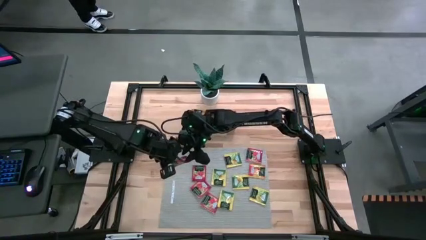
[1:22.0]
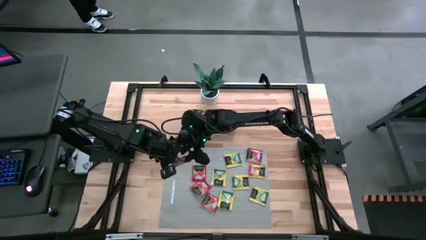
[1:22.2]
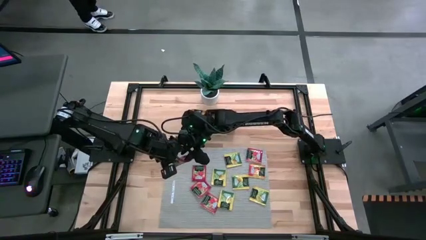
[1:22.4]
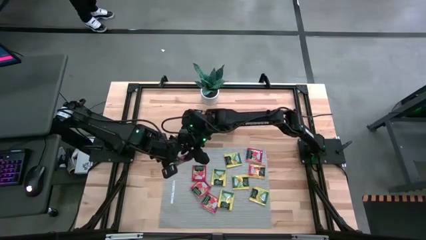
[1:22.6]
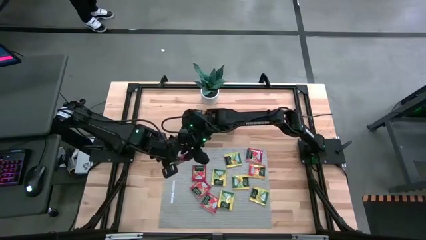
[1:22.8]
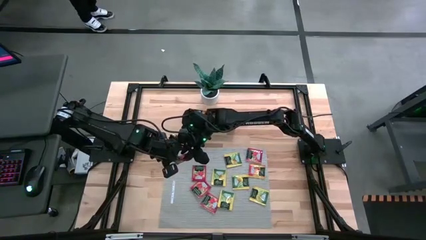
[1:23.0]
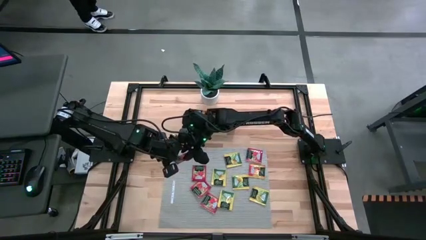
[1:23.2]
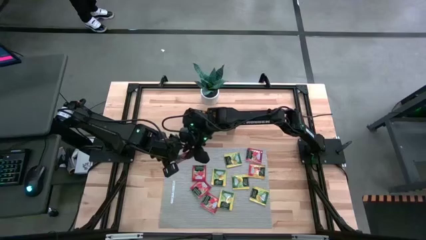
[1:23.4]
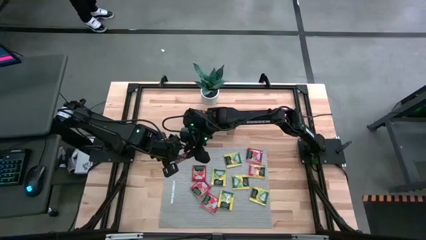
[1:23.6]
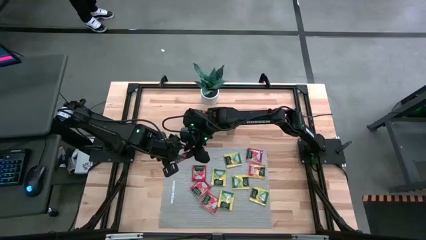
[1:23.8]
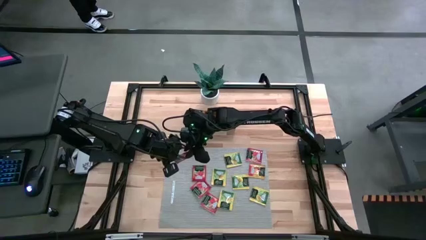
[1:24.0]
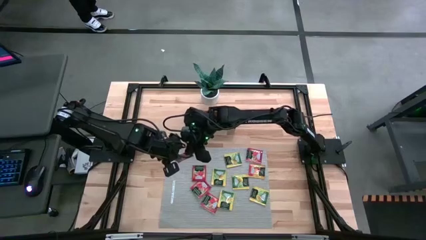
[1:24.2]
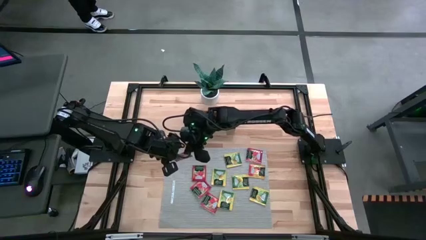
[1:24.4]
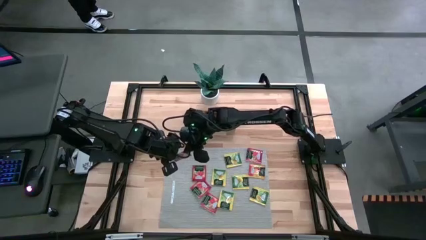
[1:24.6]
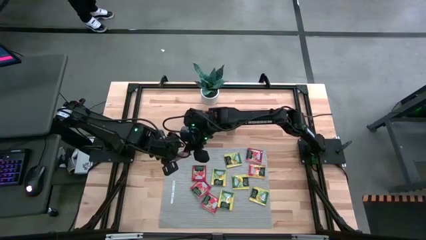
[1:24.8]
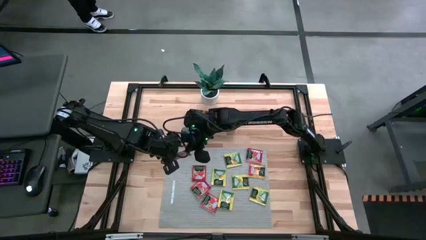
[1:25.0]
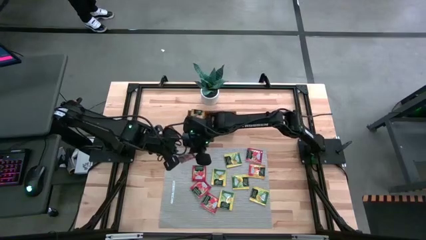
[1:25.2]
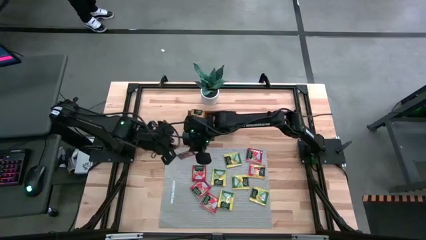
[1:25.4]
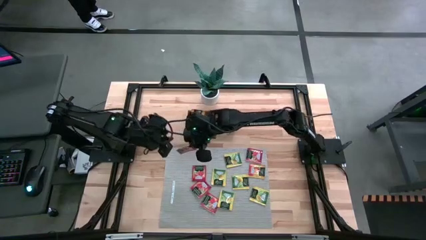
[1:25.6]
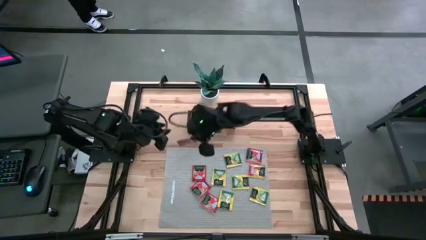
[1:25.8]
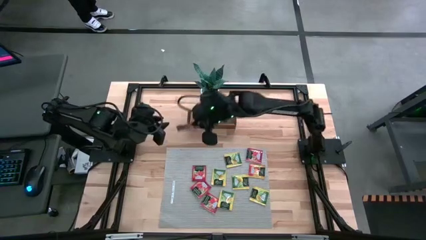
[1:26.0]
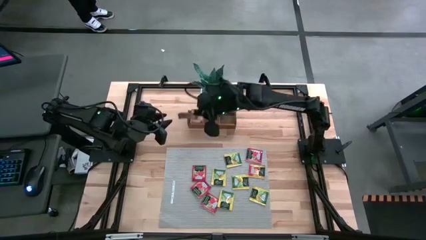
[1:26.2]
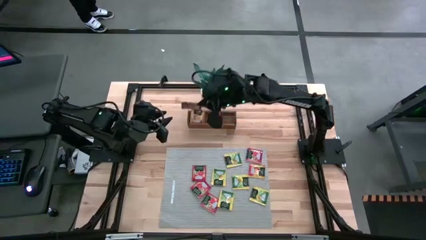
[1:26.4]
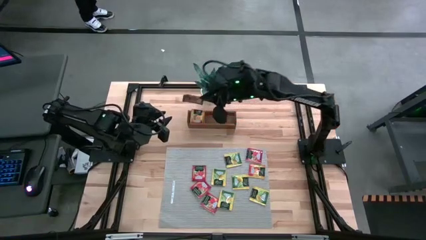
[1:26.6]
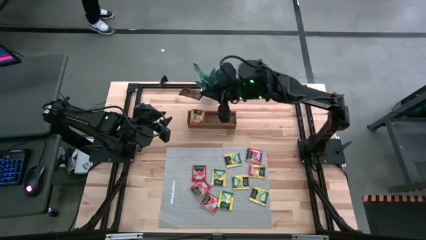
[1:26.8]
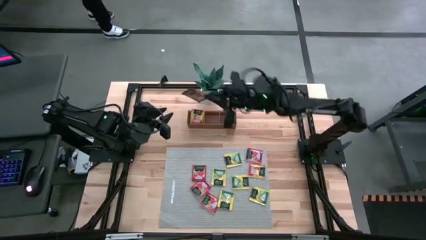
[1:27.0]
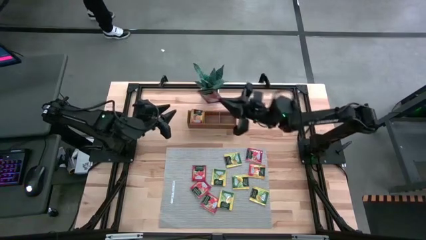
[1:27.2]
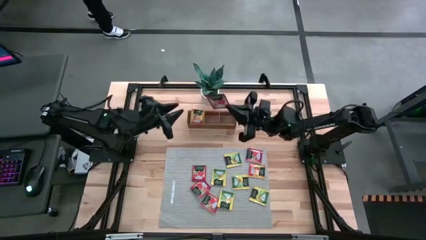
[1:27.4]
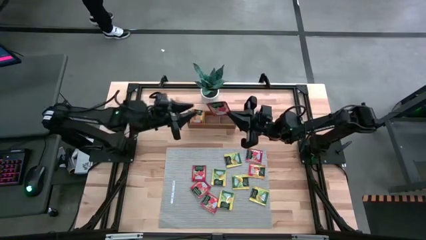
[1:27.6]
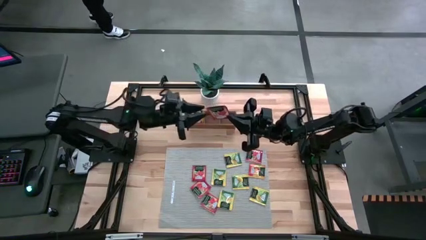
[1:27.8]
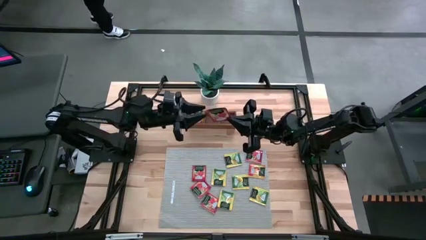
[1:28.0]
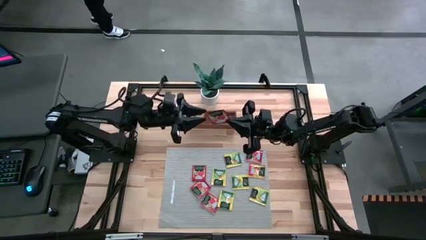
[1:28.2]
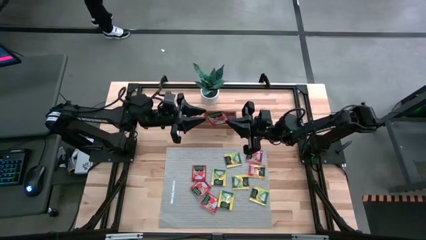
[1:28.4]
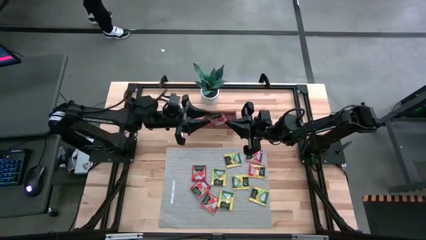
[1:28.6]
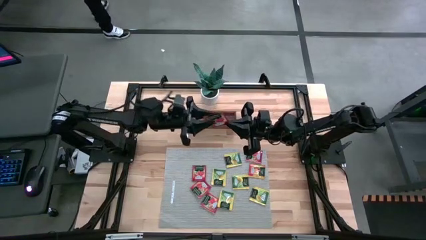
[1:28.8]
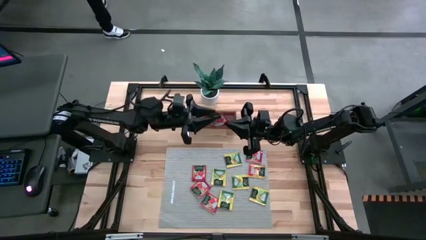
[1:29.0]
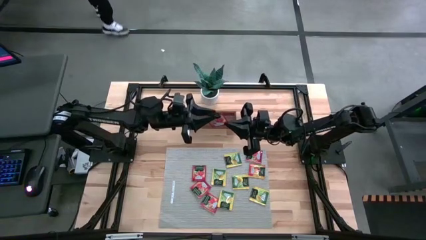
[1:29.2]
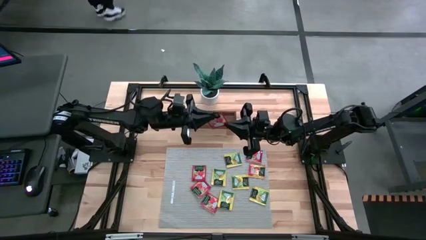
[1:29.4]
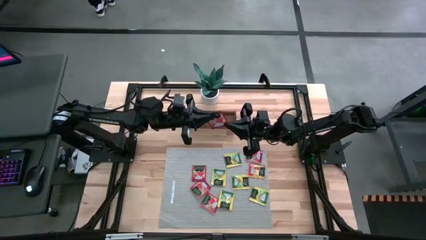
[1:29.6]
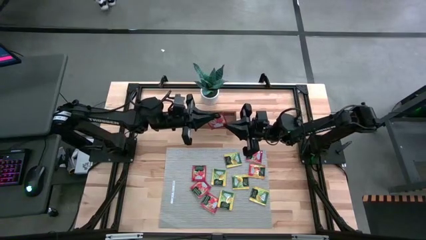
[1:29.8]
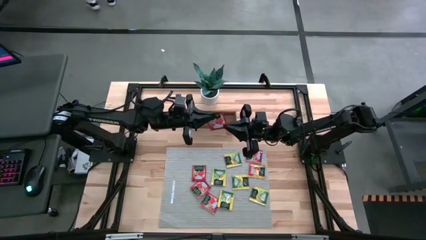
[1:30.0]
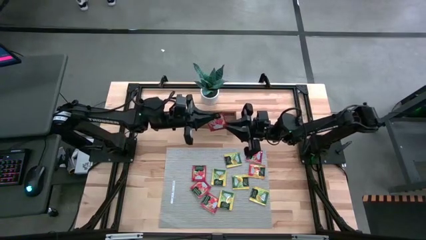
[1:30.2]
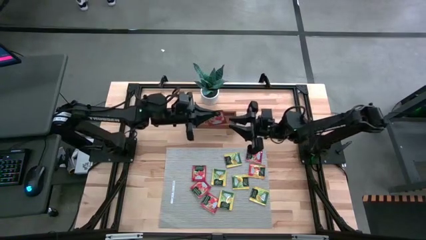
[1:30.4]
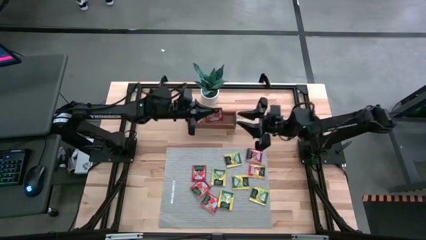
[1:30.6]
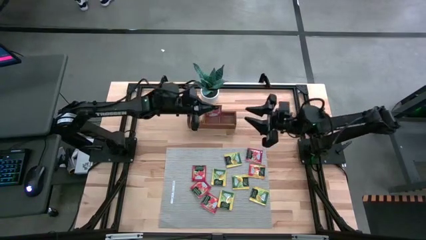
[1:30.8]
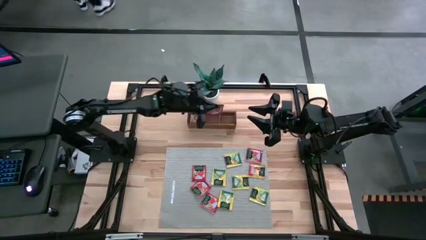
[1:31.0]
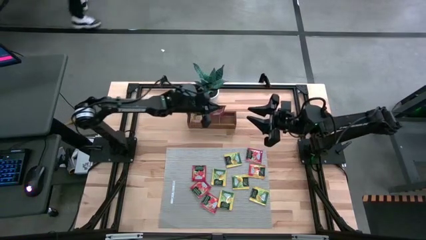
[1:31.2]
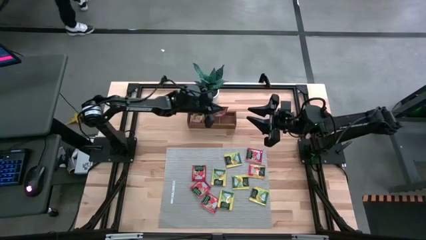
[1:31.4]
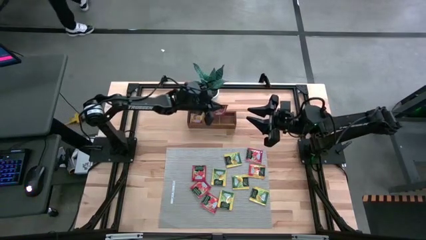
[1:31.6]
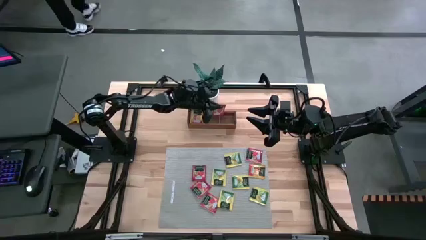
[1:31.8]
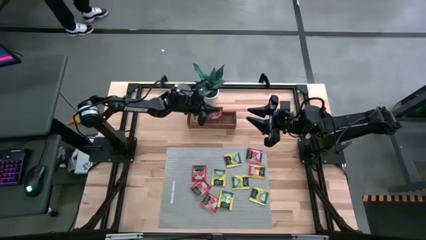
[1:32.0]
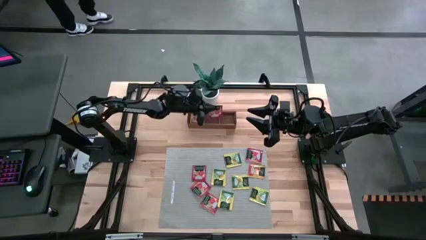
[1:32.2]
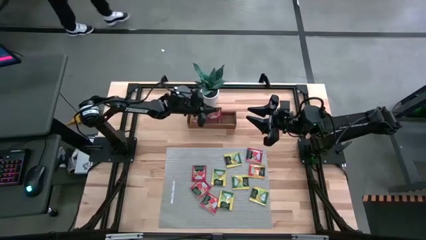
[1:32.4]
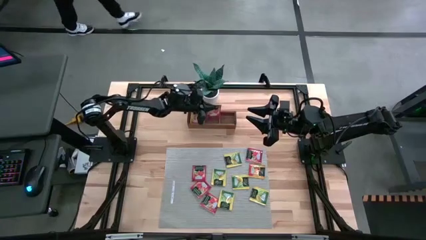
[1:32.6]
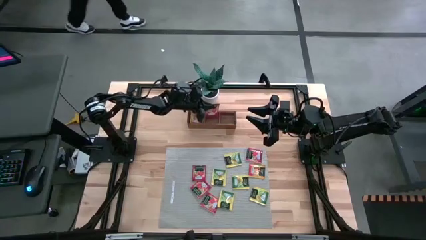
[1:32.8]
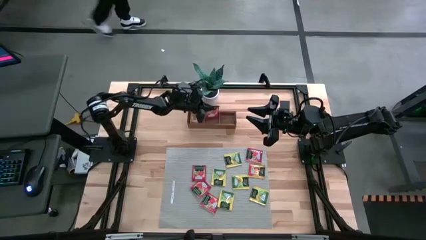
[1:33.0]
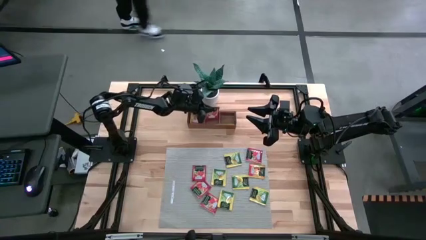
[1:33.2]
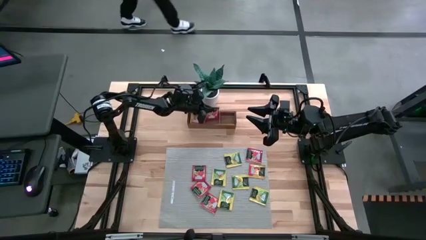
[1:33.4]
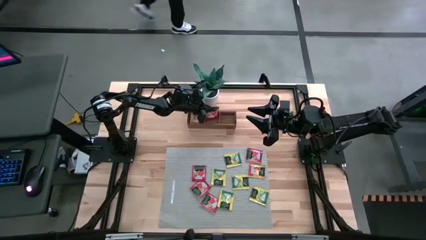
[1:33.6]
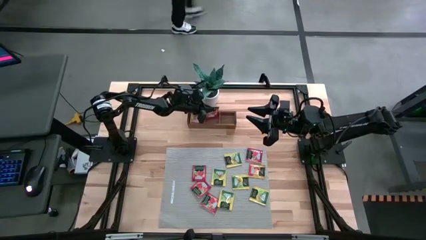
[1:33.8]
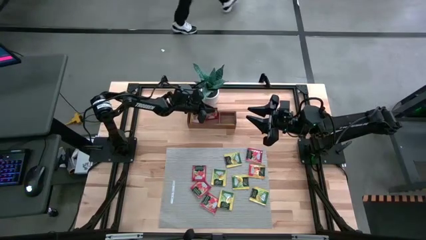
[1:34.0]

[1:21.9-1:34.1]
Task: Pick & Place Tea
Put the red tea bag into the middle section of the wooden organizer
